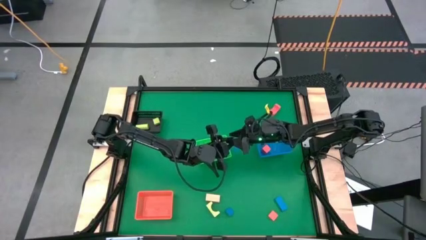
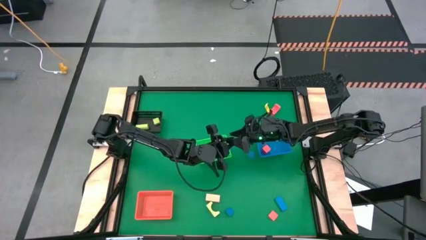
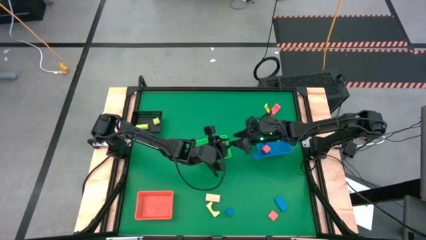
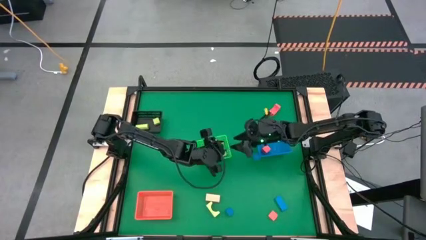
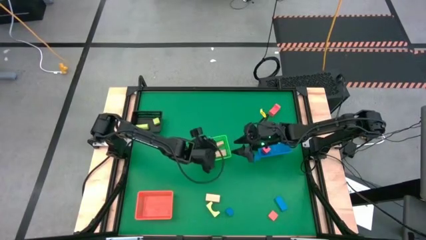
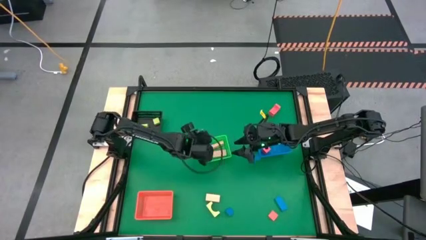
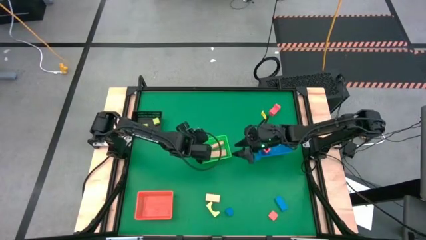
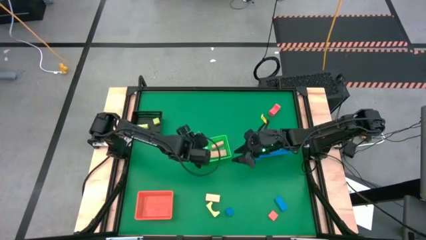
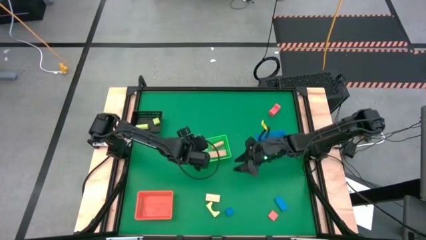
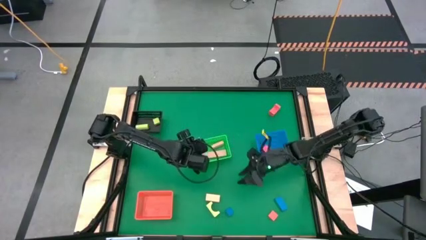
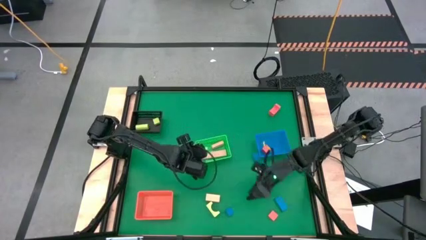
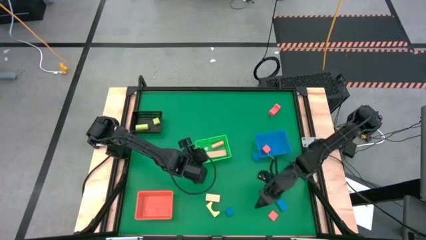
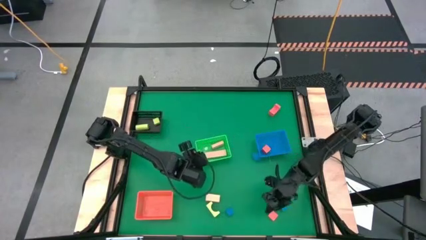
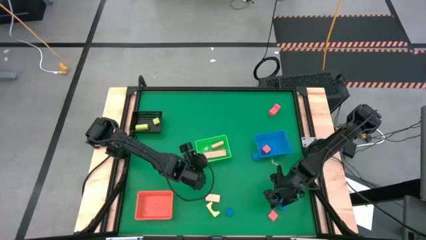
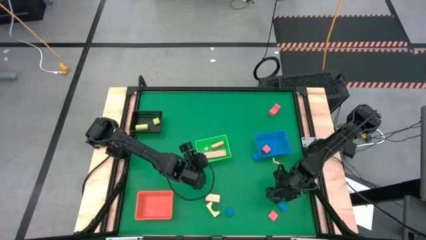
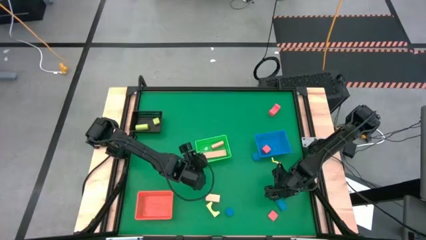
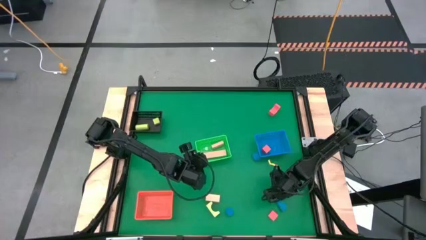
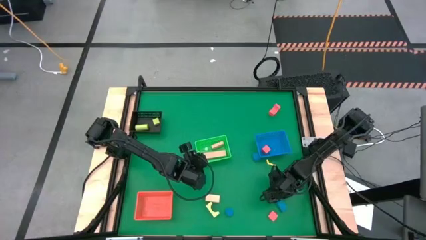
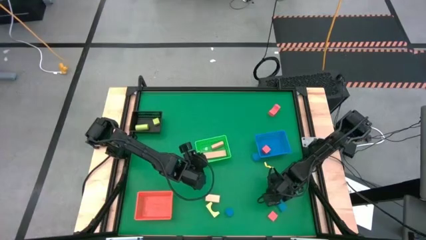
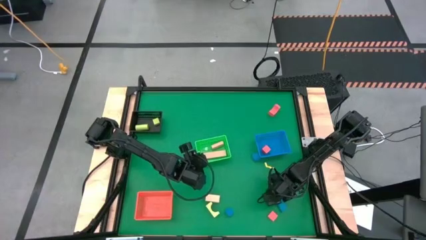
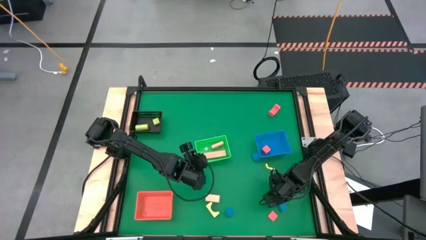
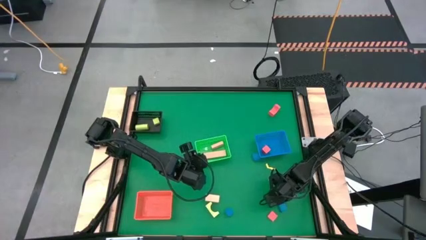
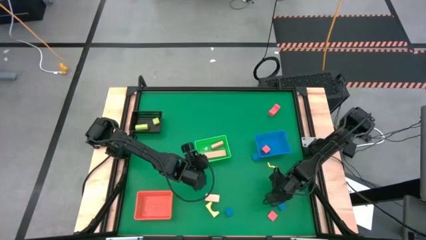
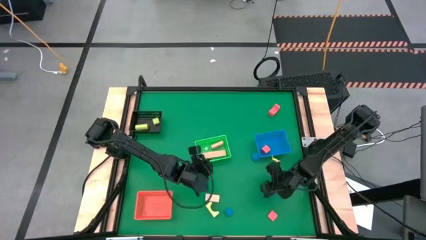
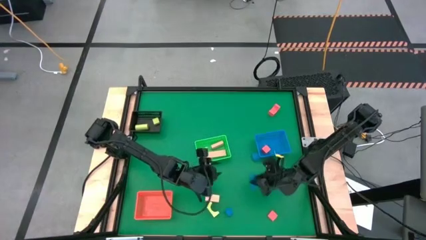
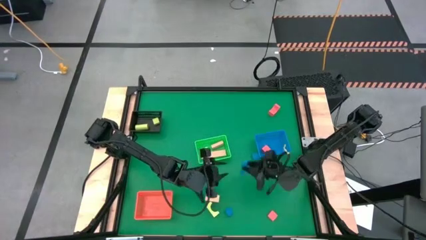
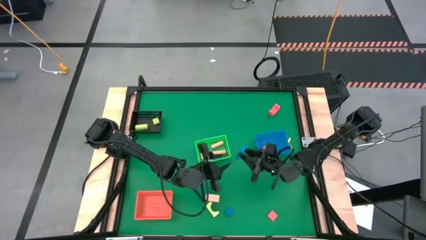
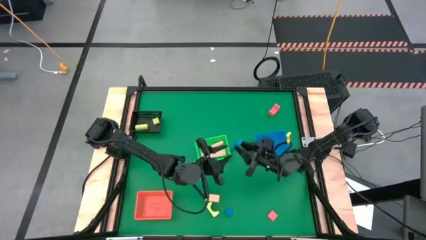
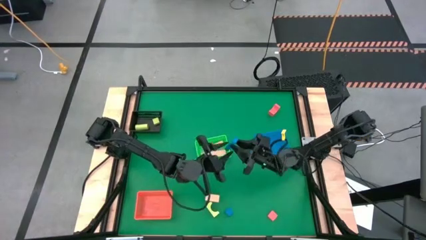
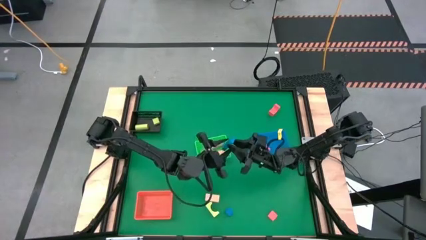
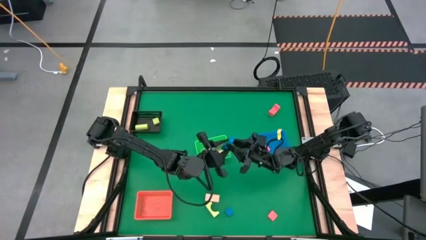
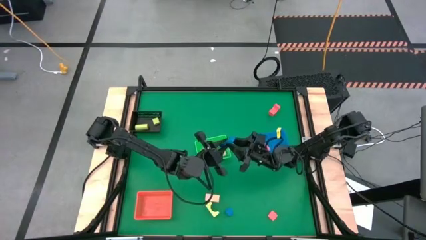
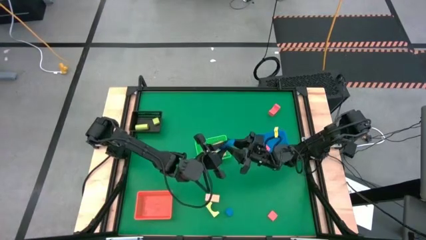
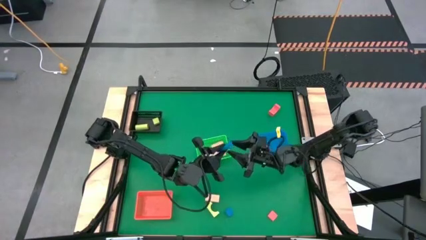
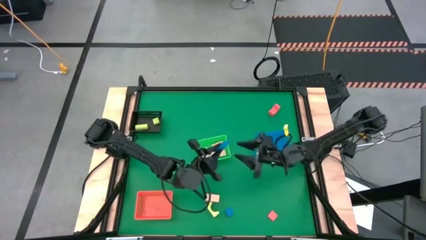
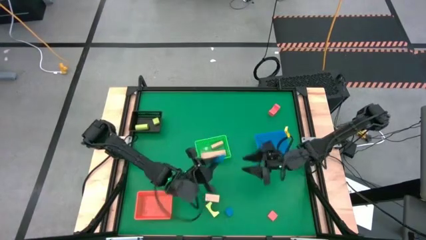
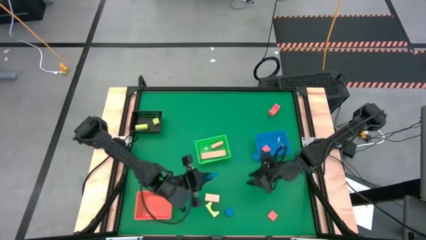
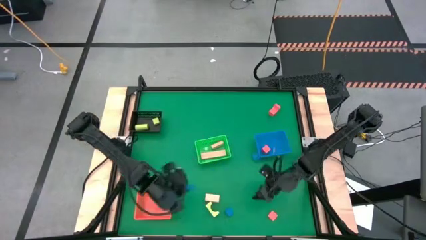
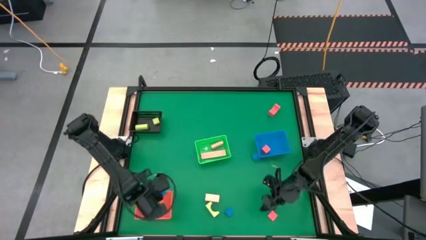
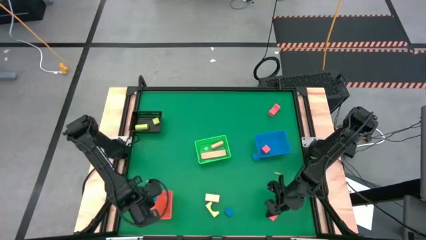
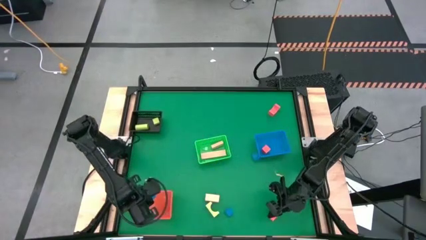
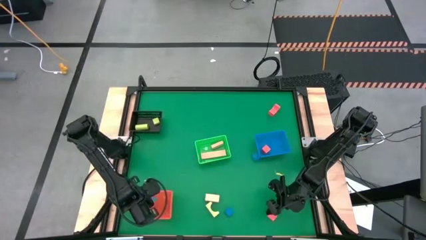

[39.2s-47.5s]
Task: Sort & place blocks by color
Put the bottom right blue block into the red bin

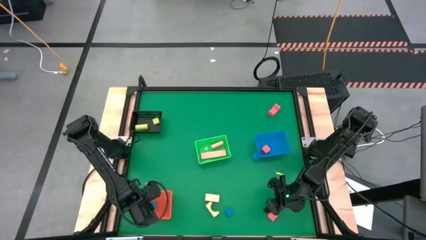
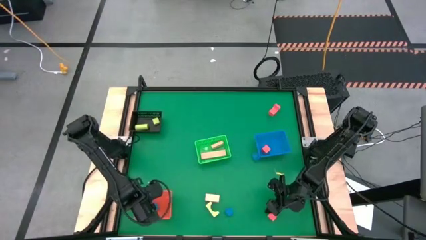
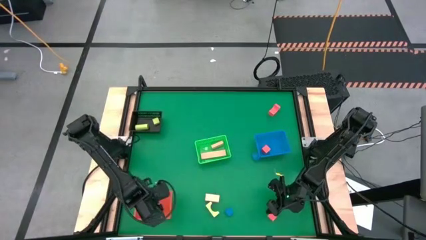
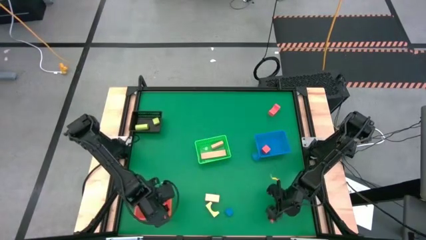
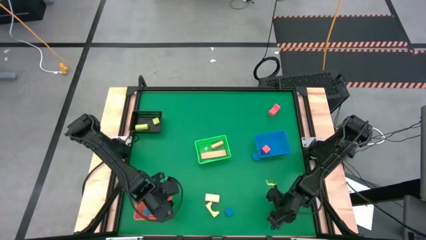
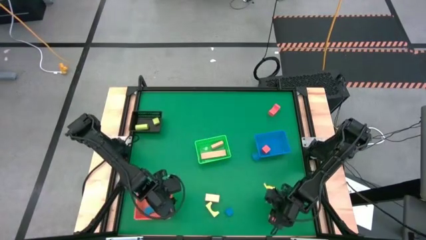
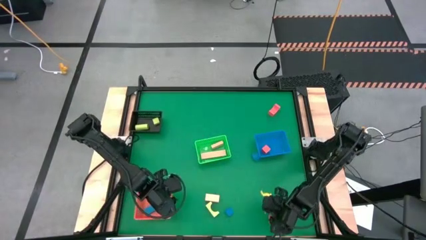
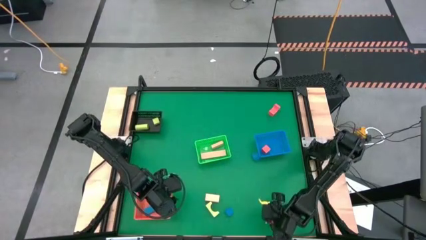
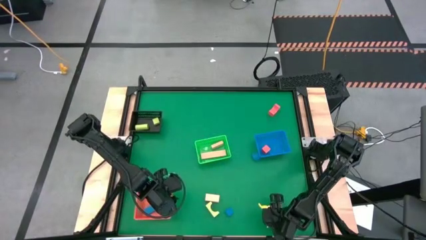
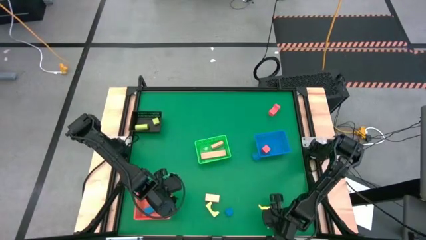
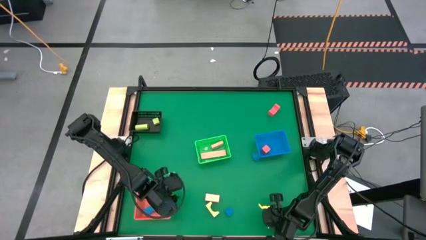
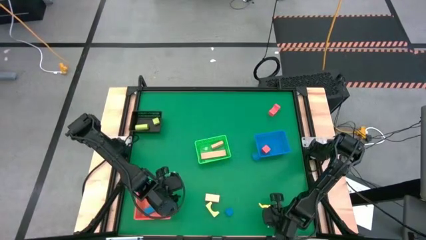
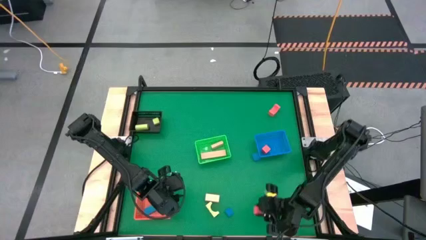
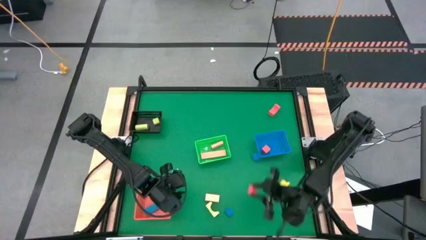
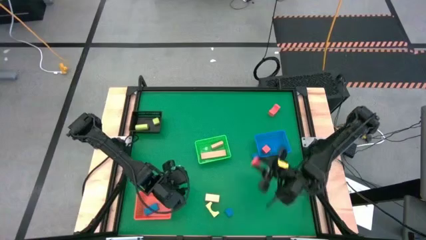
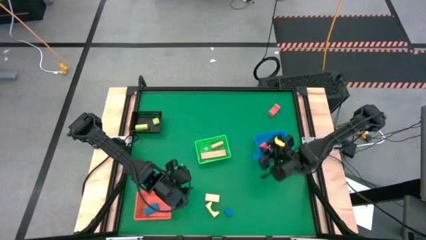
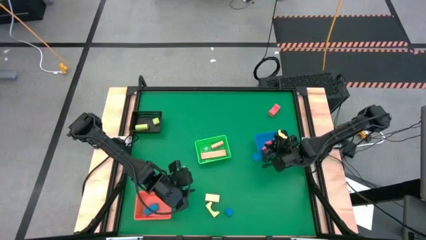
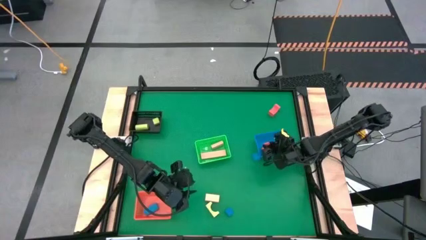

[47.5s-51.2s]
Put the bottom red block into the blue bin

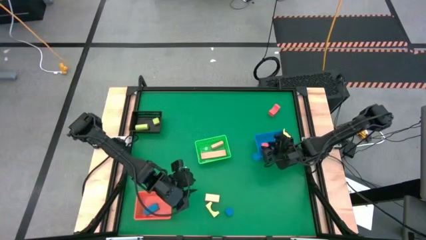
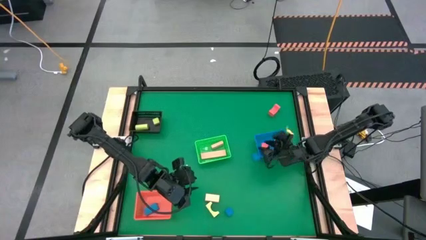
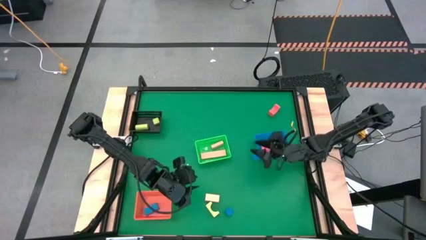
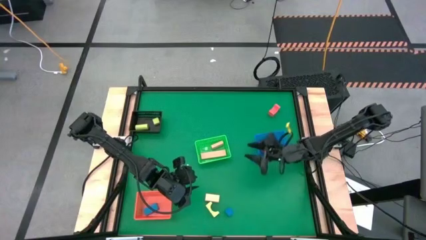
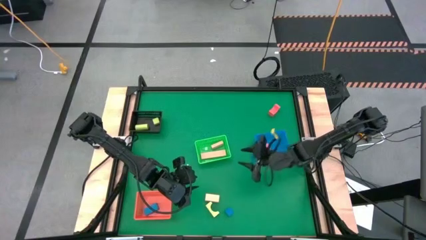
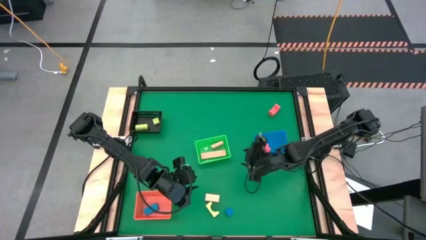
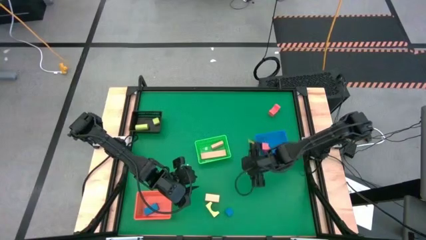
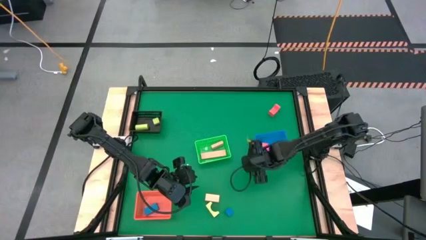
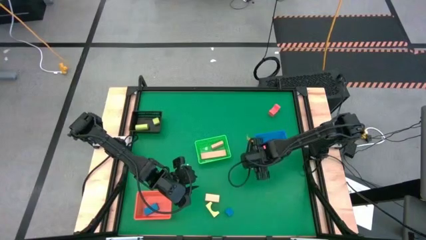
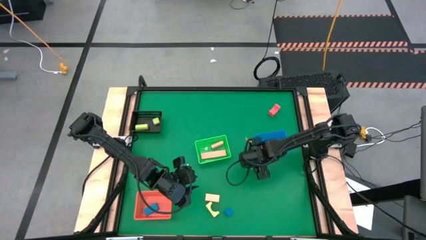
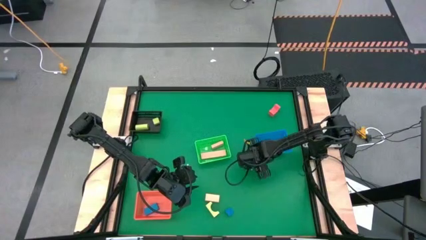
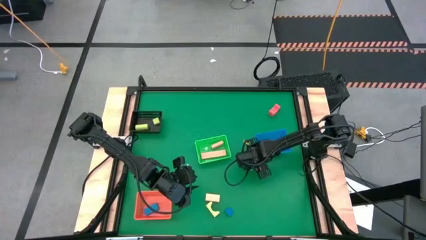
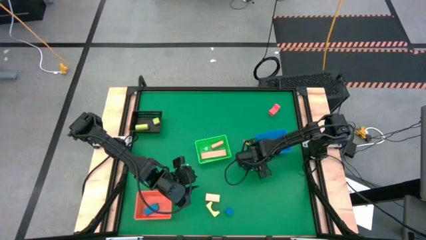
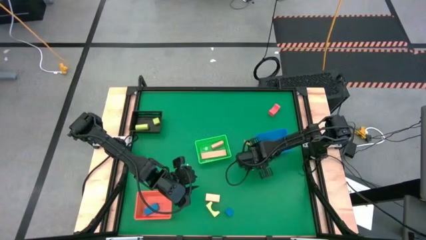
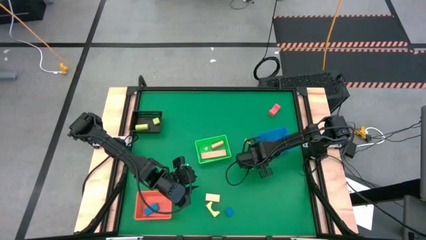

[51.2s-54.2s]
Put the top blue block into the red bin

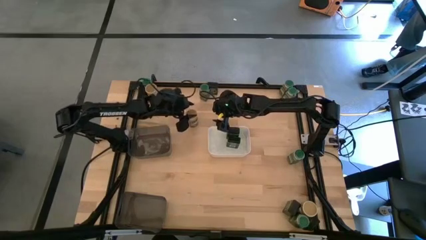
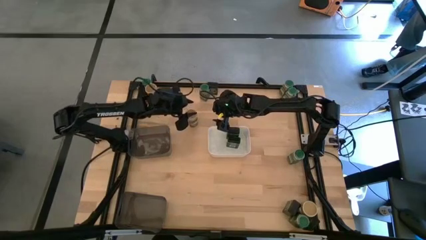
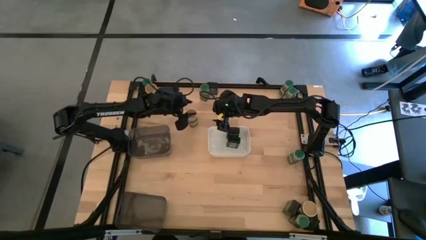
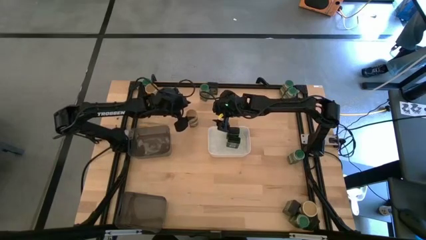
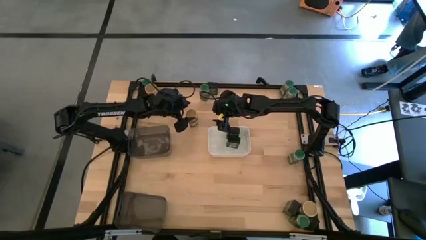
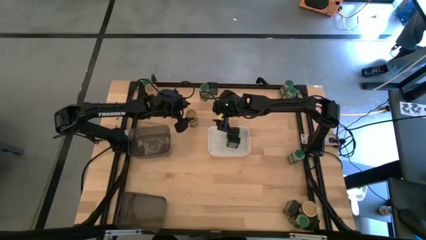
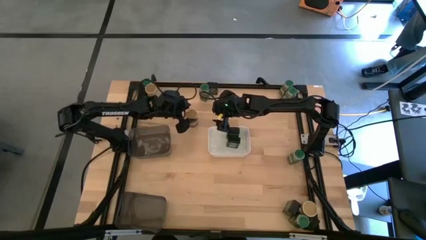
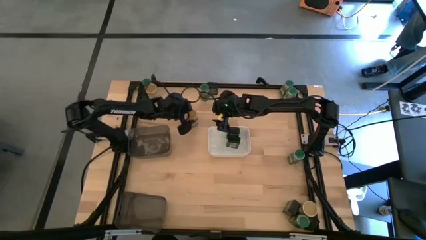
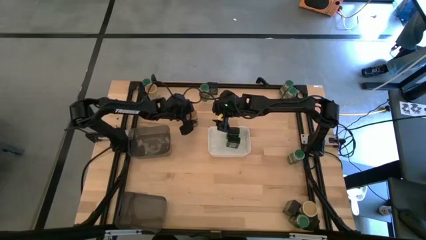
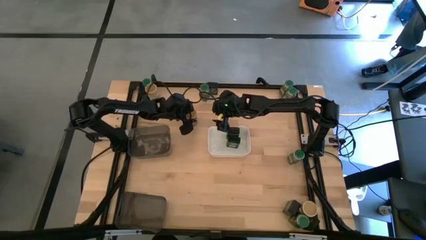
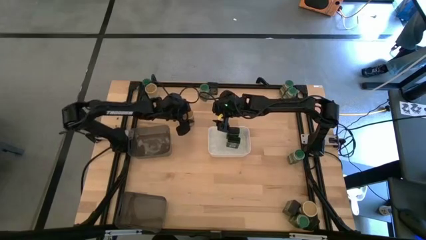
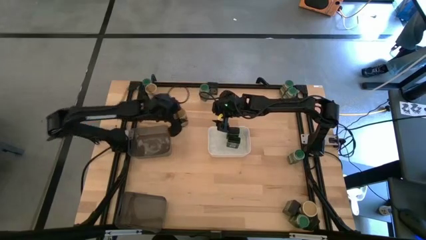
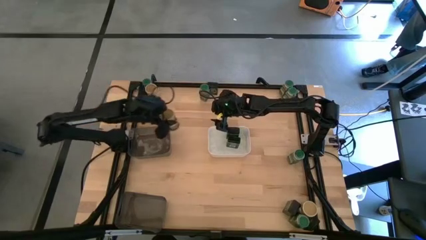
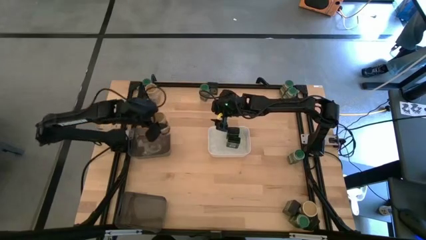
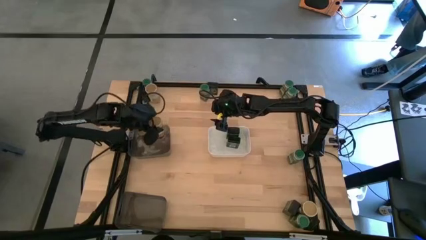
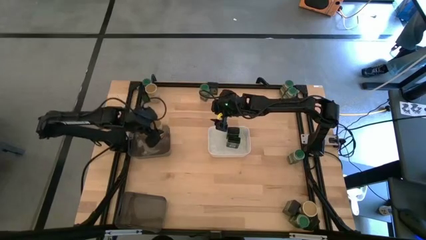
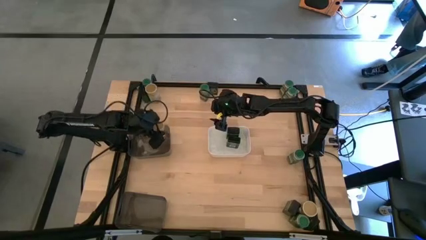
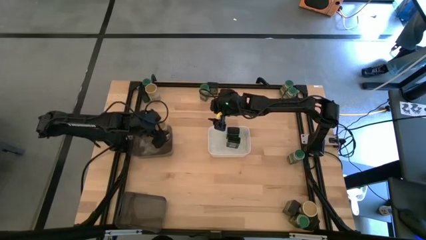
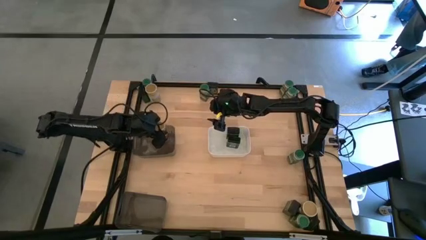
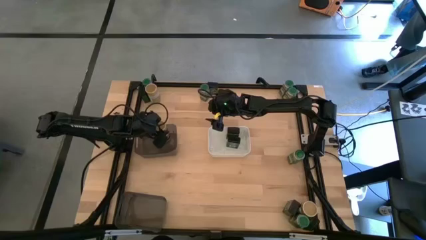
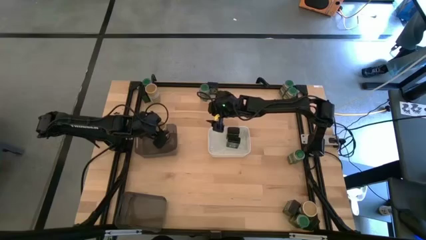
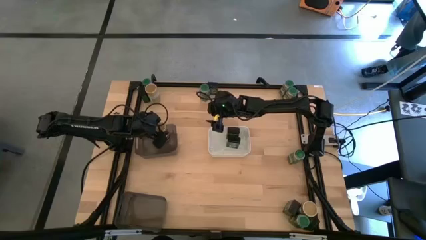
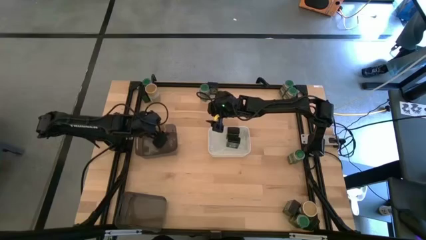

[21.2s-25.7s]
Task: Sort spices by type
Put the gold seasoning bottle into the top black bin
